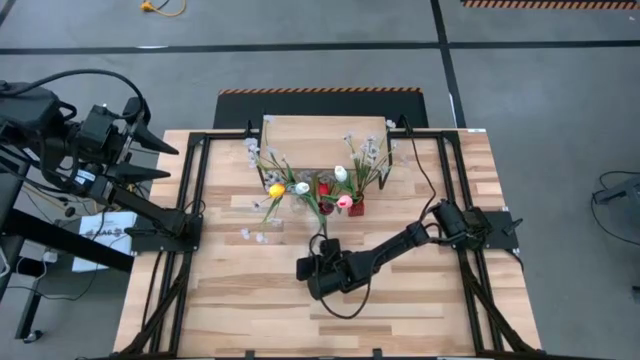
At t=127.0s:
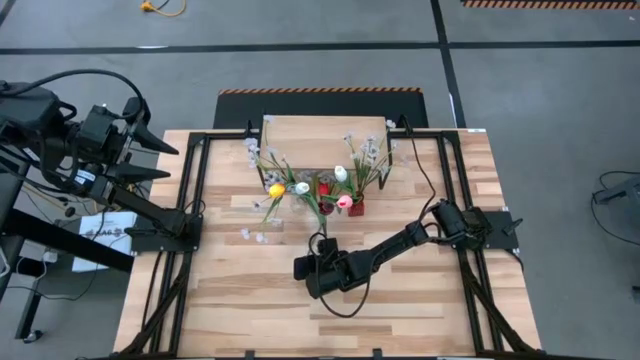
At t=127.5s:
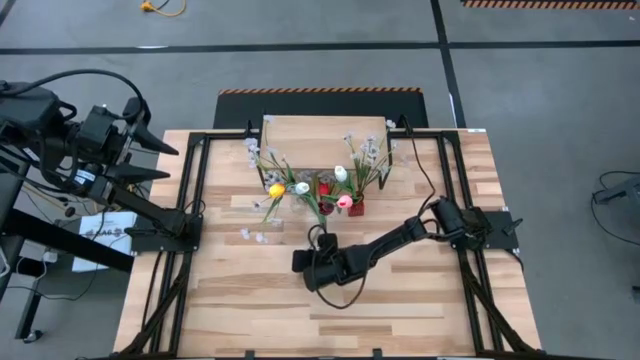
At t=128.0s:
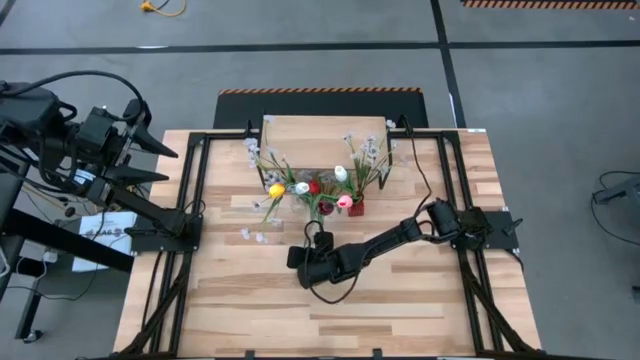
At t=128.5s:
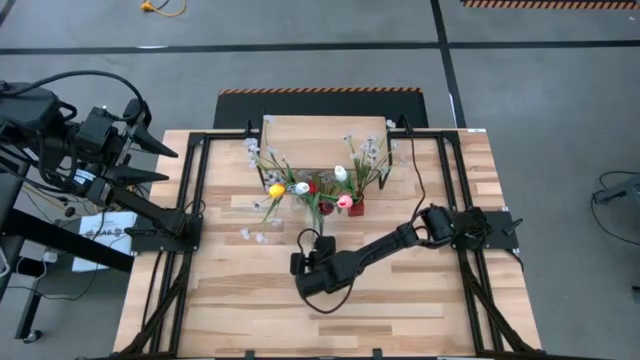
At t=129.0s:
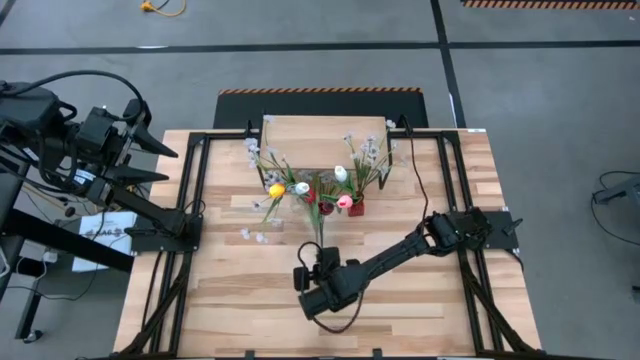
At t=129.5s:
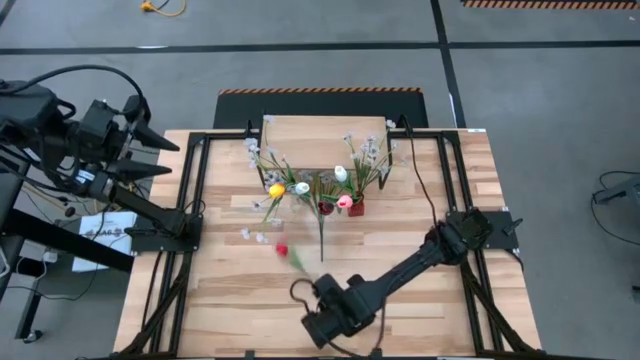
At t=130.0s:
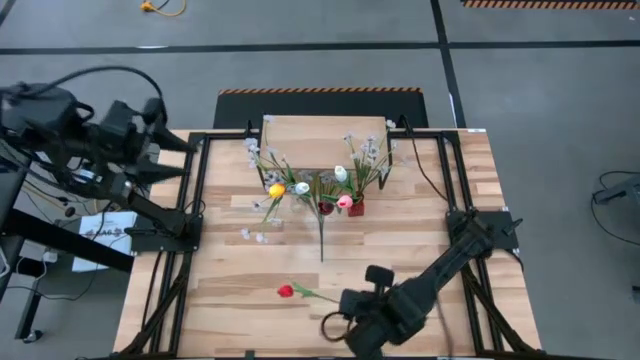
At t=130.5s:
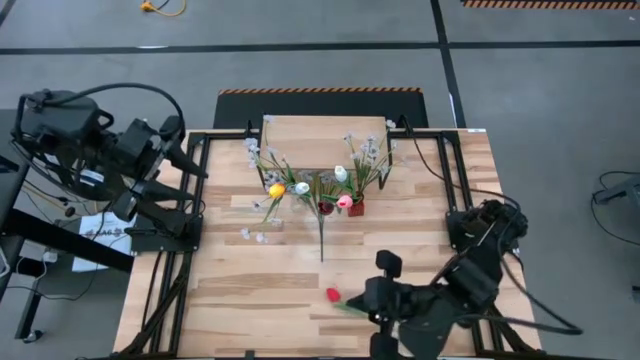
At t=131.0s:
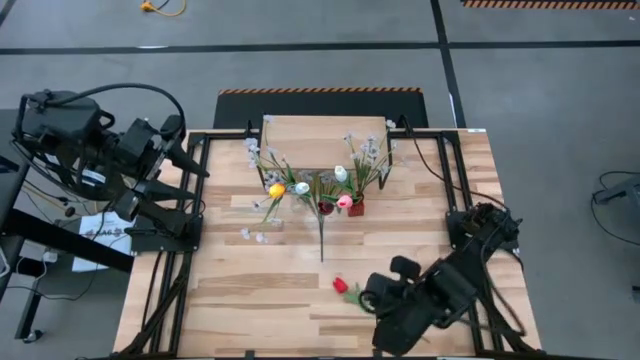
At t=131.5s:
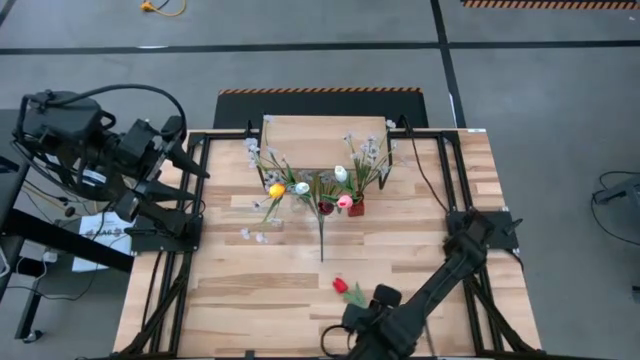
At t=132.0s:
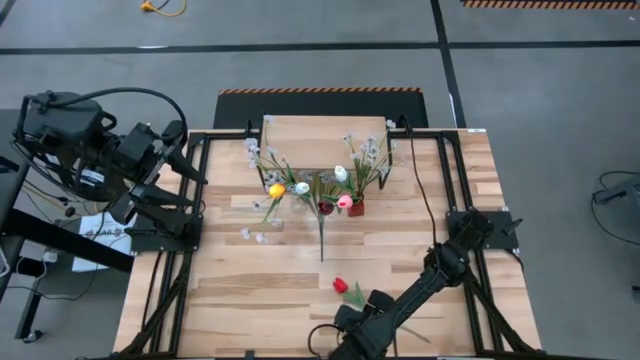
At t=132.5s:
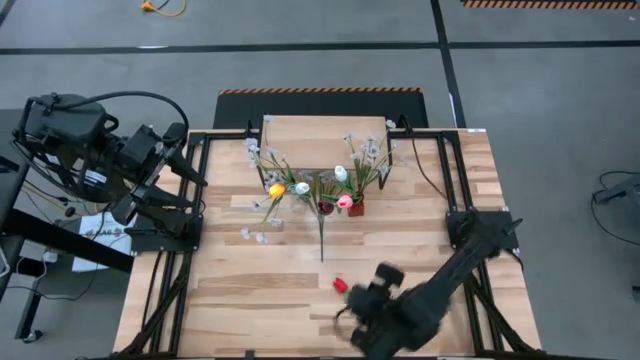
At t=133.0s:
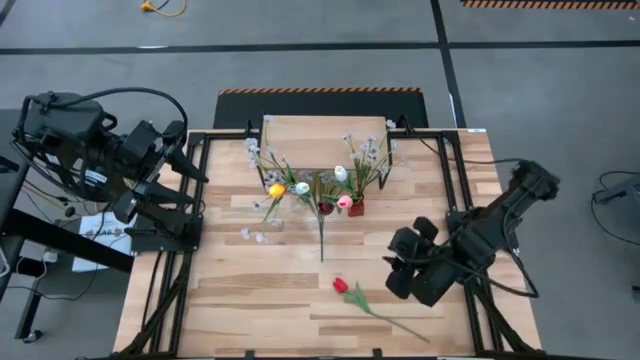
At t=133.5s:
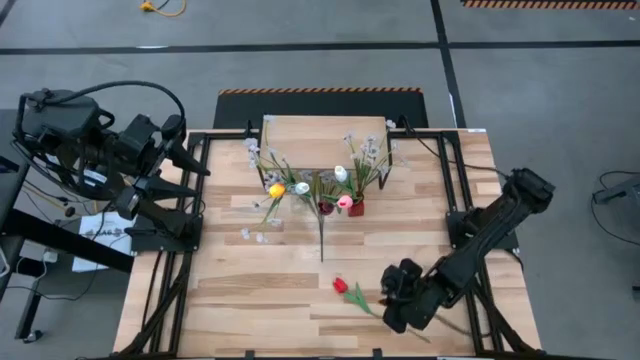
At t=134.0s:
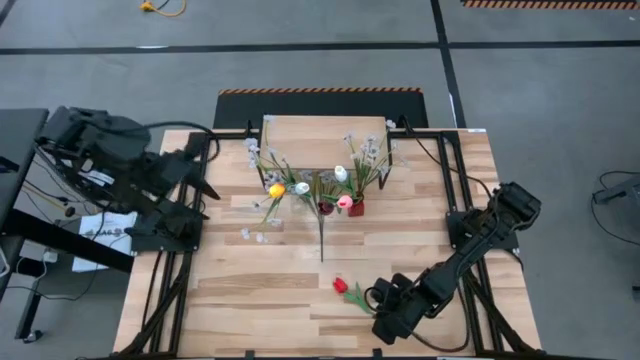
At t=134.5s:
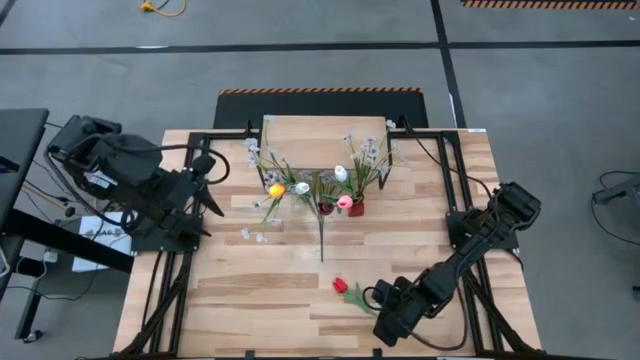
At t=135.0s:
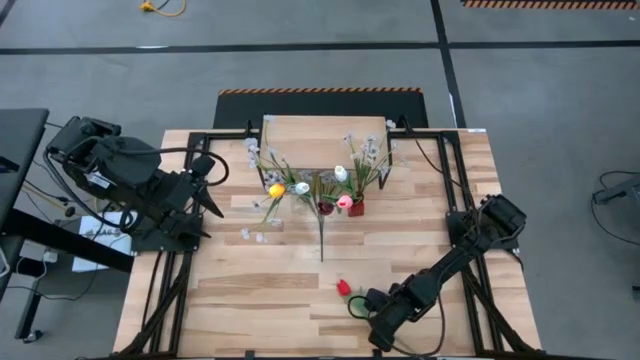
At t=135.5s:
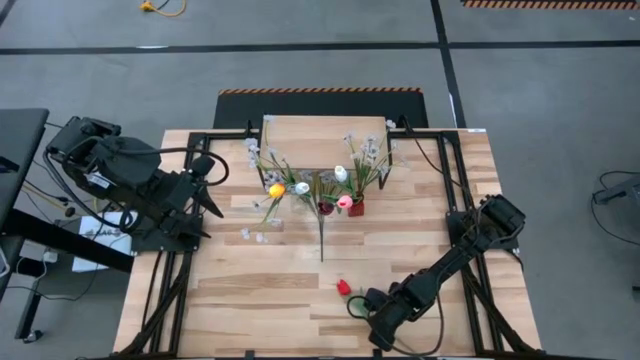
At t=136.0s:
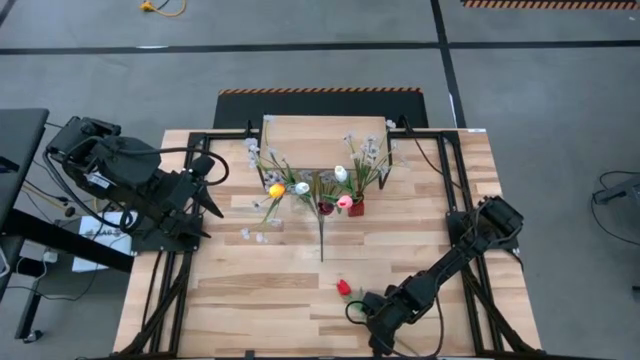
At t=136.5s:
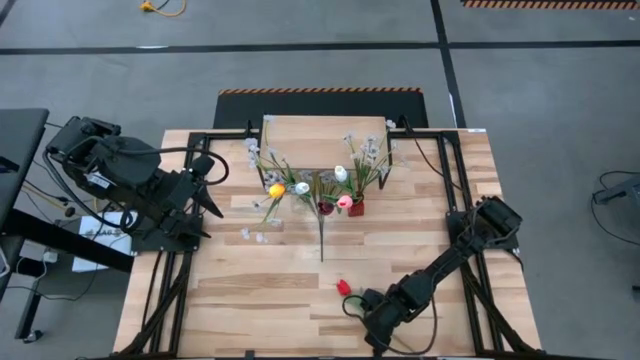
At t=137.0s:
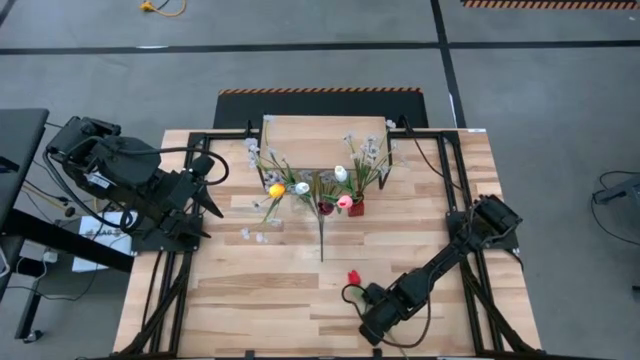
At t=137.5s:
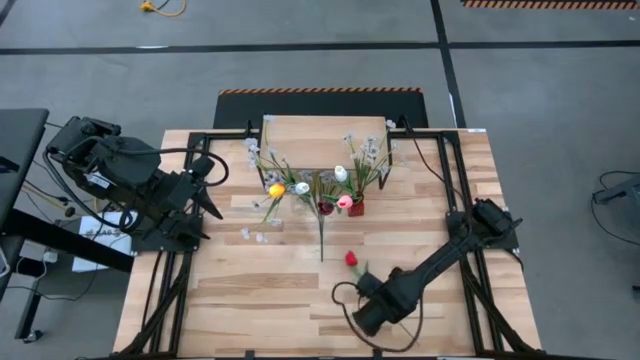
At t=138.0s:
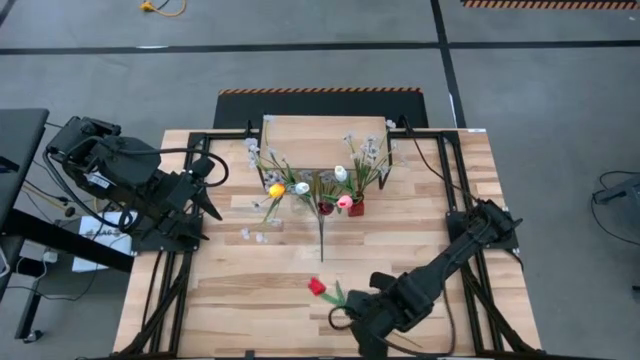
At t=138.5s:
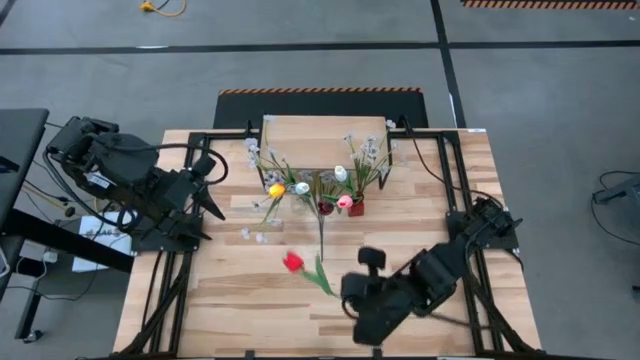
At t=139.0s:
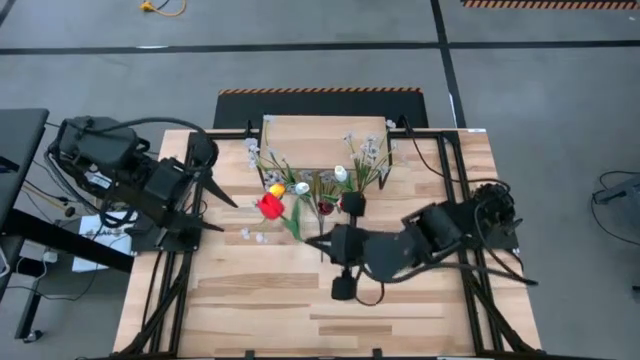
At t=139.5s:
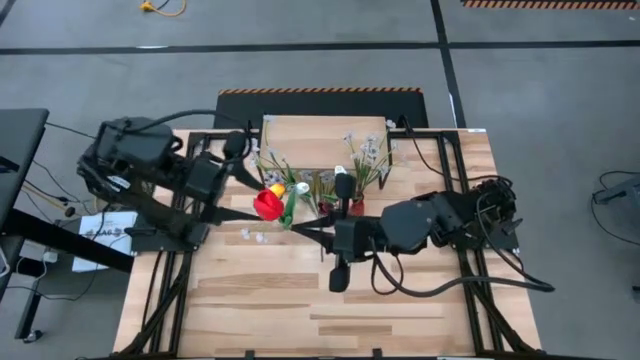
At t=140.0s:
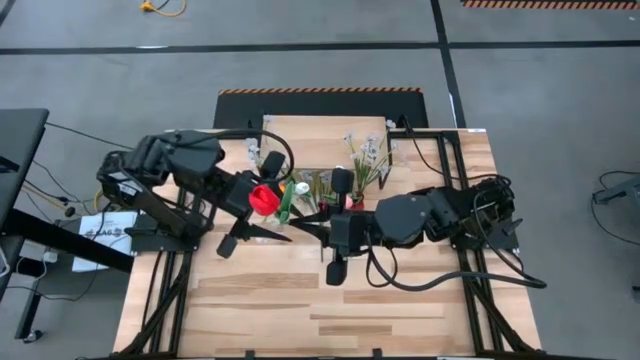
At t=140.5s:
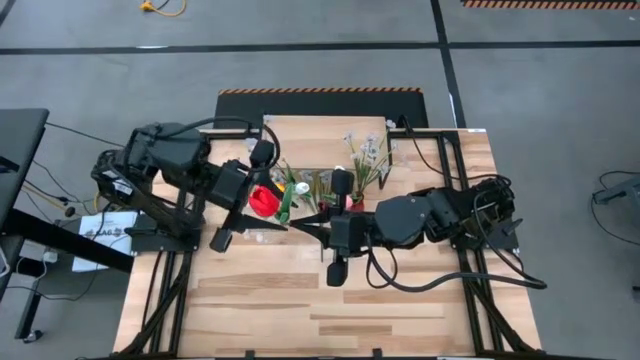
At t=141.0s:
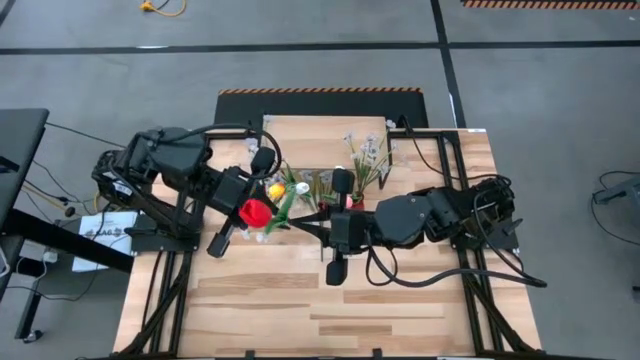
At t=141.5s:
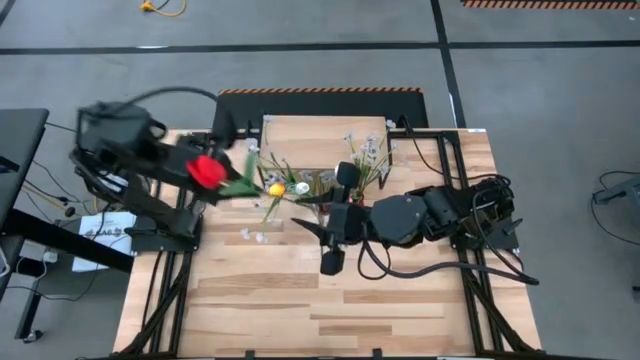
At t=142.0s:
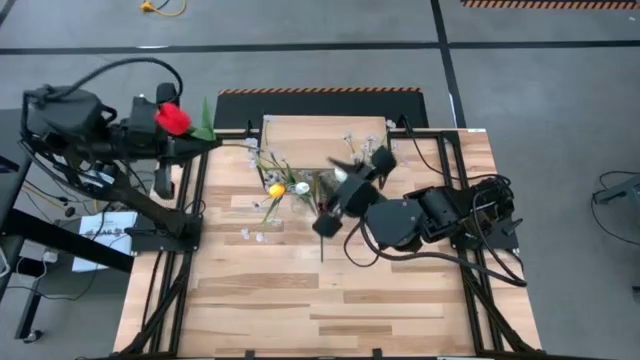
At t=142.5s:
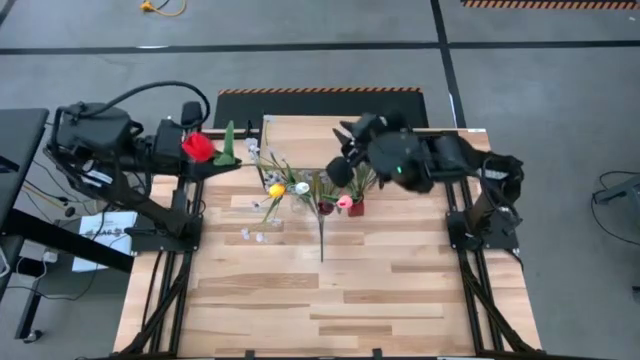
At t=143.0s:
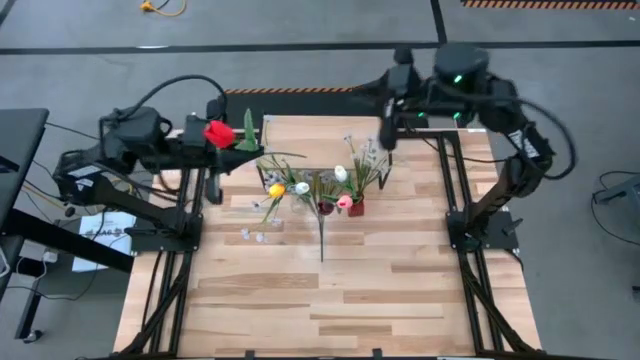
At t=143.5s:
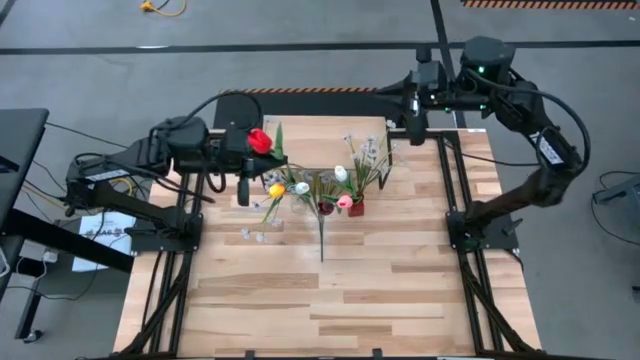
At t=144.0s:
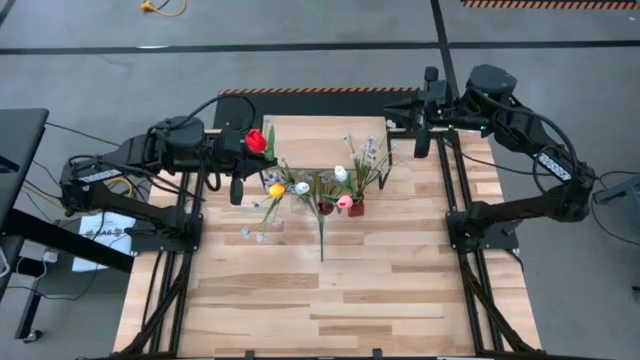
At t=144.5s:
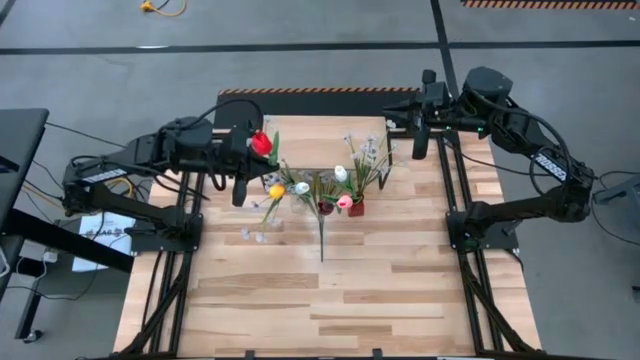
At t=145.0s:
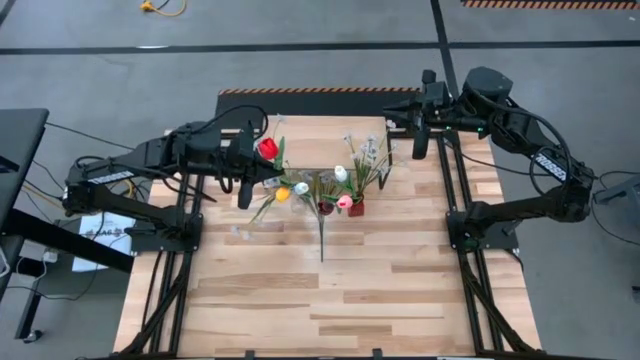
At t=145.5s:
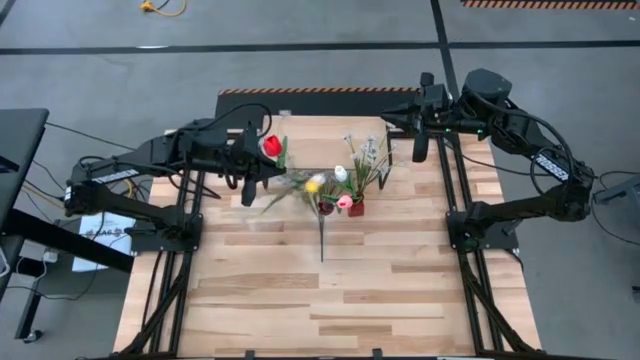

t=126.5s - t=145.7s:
Task: Pick and place flowers into a vace then onto a shelf
Put the red flower into the transparent vase
